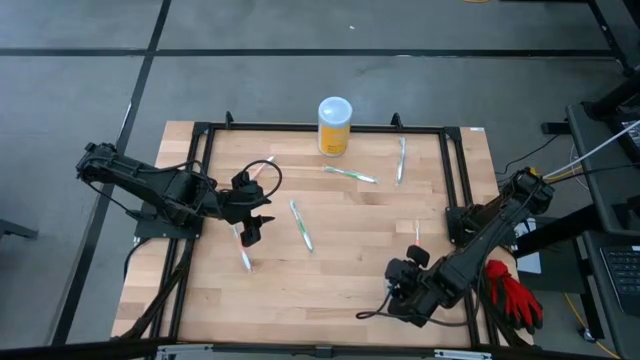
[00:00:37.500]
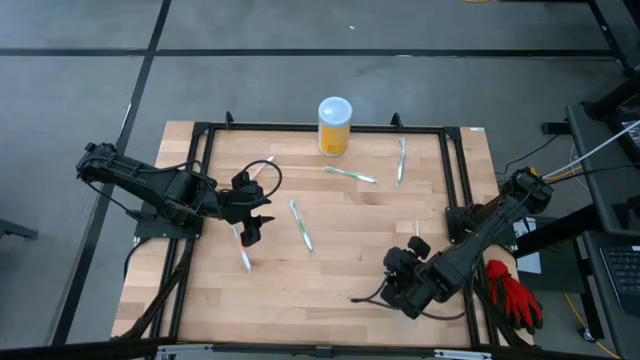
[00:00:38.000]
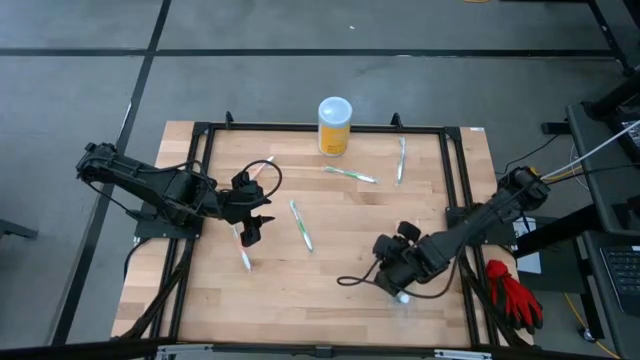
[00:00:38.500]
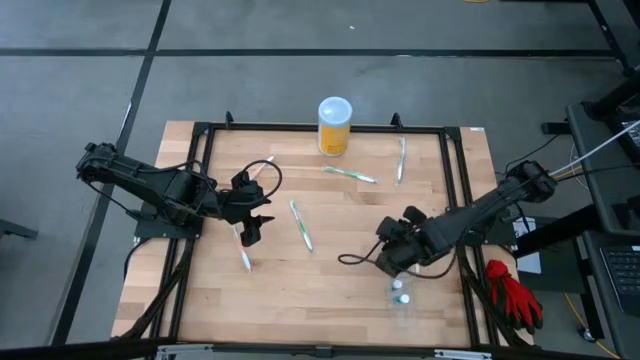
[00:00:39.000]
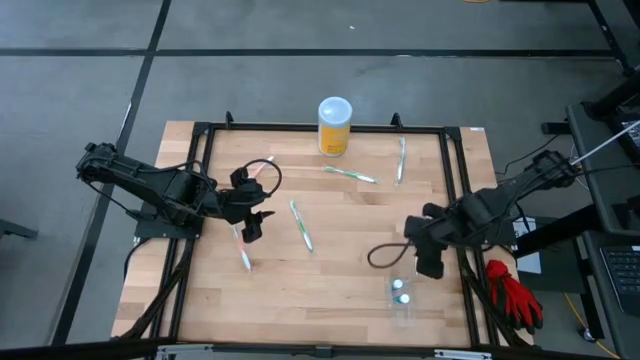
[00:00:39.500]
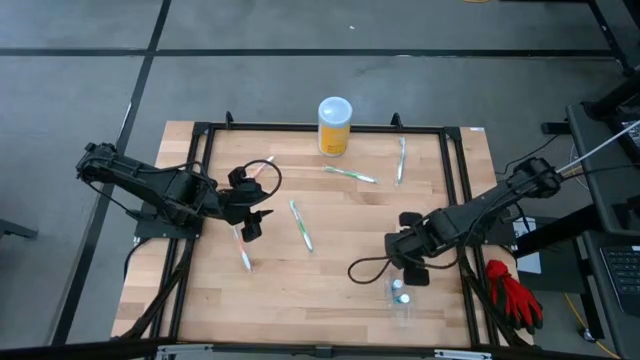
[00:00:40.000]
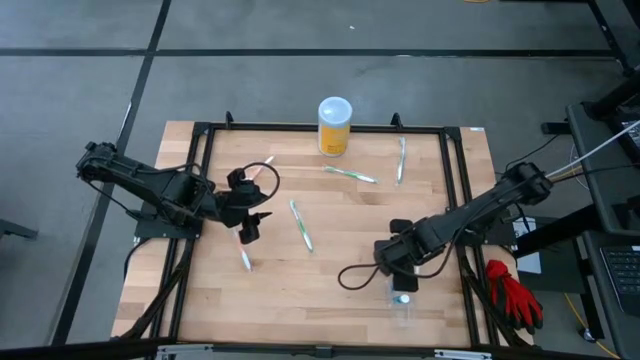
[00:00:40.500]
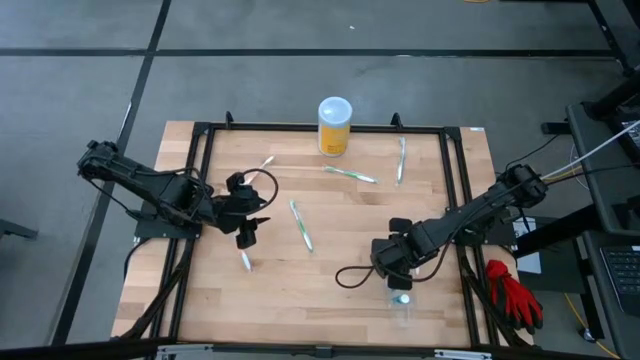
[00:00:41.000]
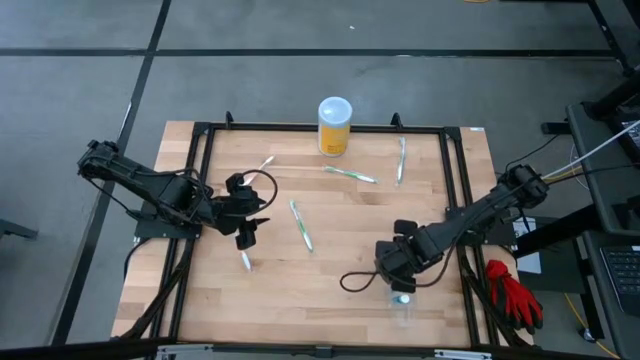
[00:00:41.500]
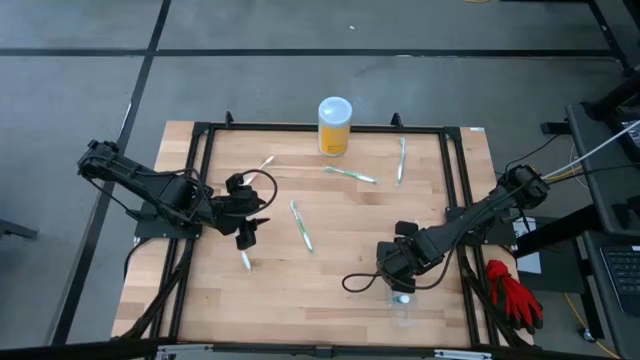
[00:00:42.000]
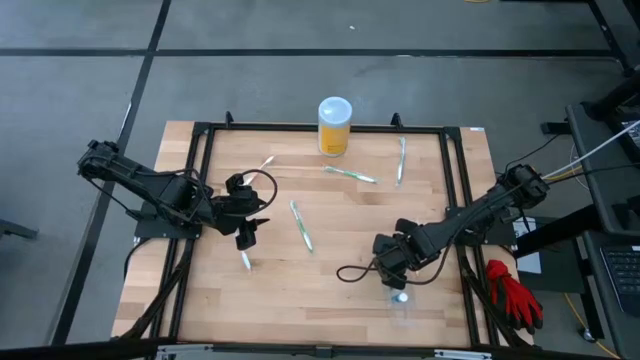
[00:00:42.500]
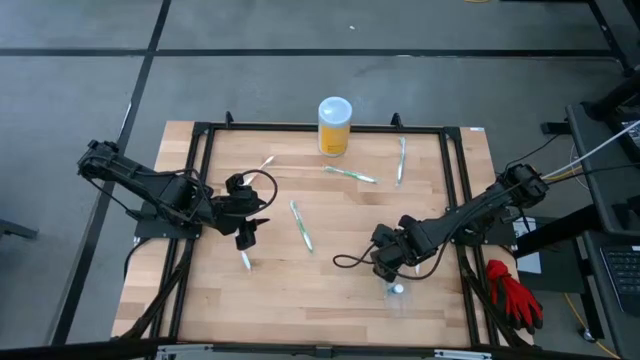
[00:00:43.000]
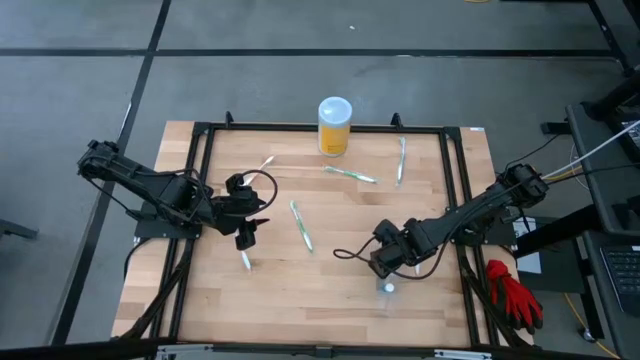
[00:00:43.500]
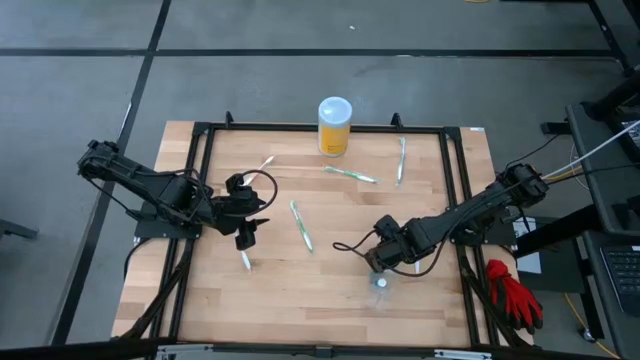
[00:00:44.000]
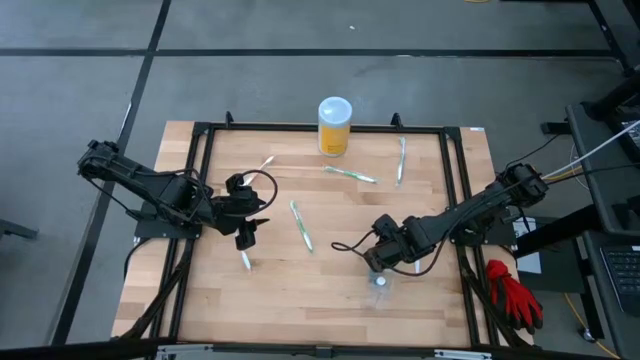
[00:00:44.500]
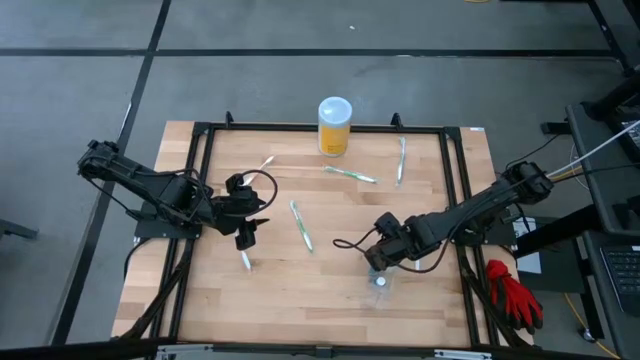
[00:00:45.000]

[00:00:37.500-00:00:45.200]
Task: Pick & Place toothbrushing station
Adjust the transparent organizer on the table

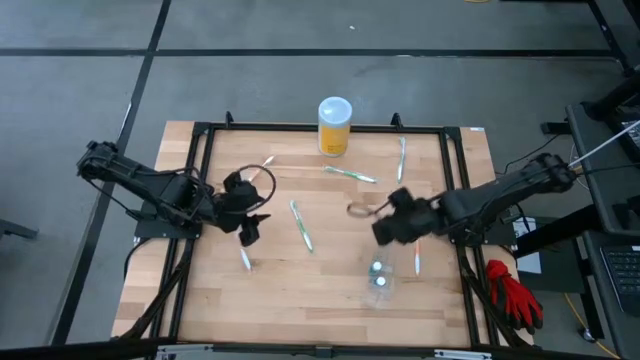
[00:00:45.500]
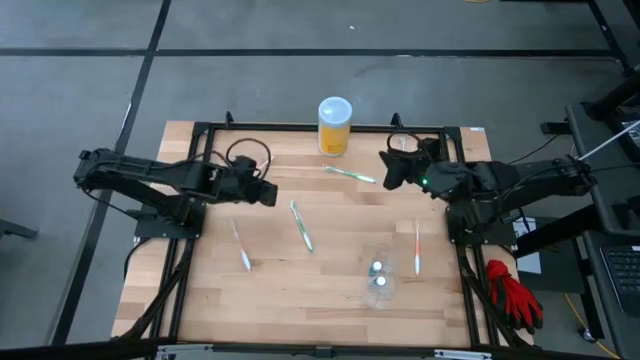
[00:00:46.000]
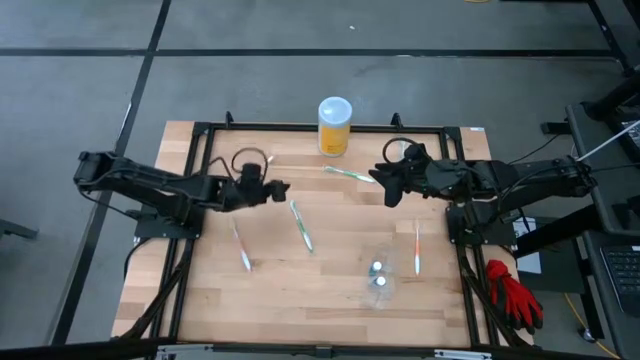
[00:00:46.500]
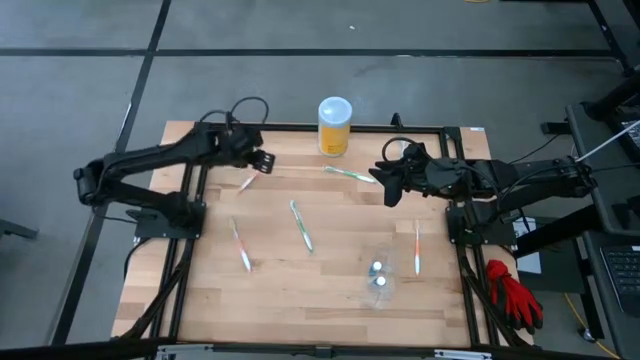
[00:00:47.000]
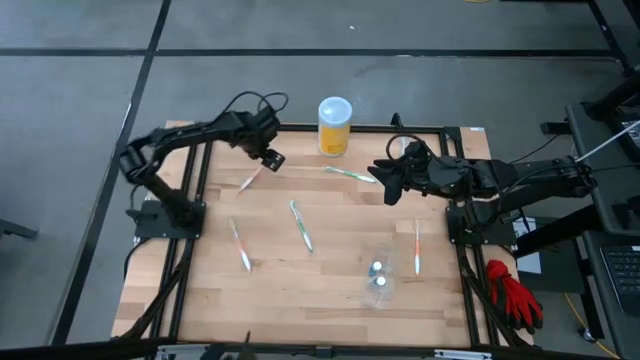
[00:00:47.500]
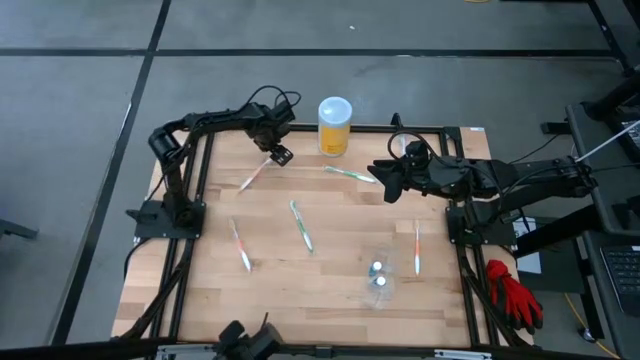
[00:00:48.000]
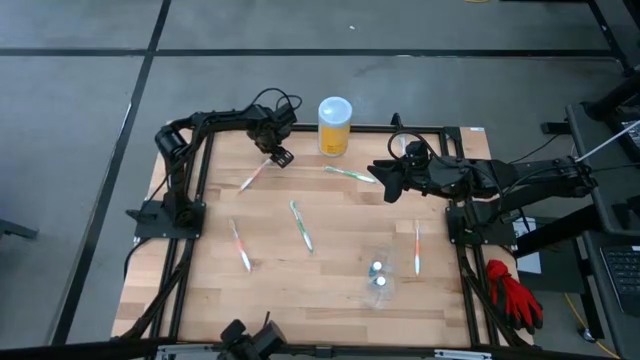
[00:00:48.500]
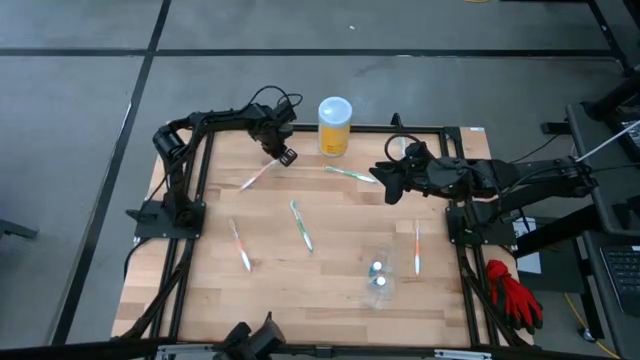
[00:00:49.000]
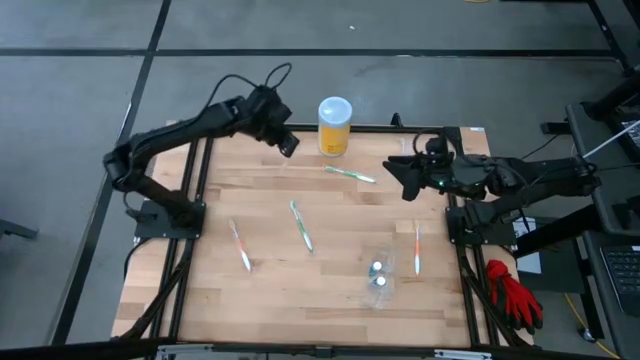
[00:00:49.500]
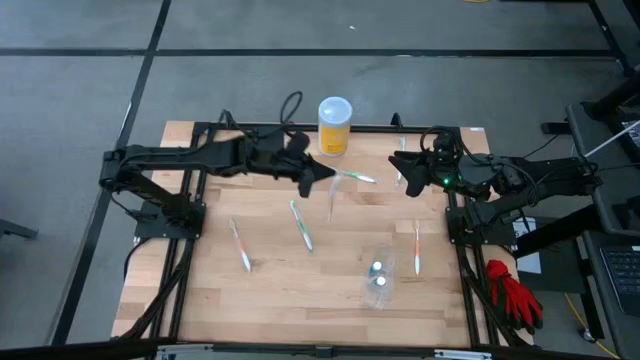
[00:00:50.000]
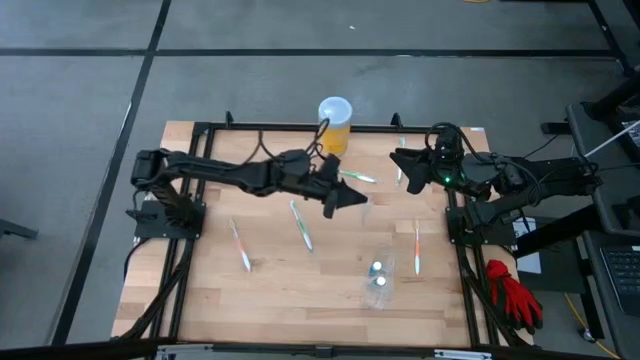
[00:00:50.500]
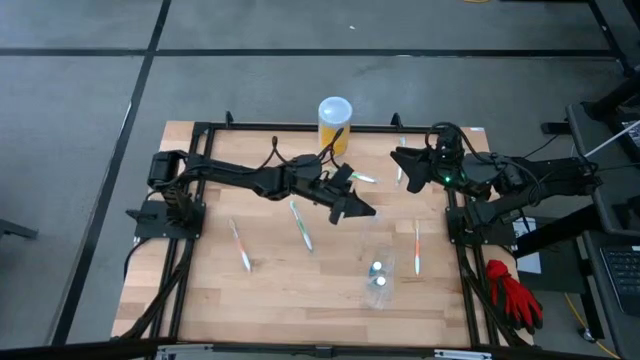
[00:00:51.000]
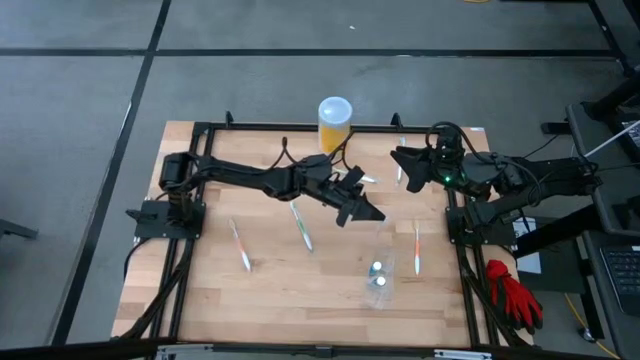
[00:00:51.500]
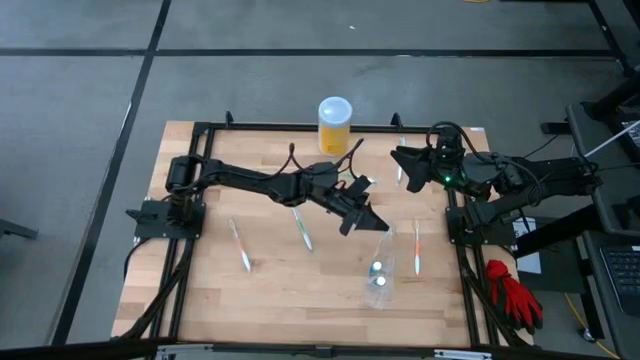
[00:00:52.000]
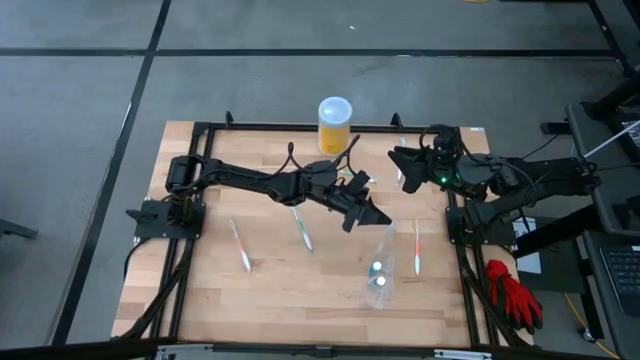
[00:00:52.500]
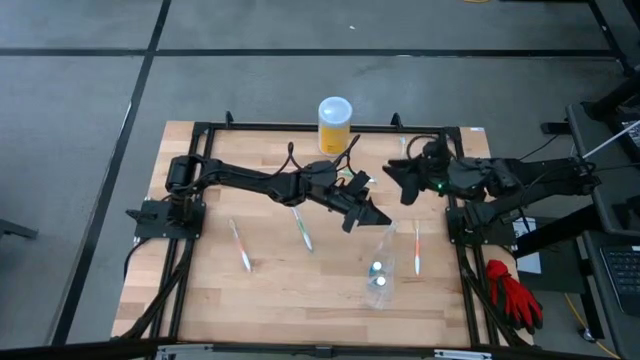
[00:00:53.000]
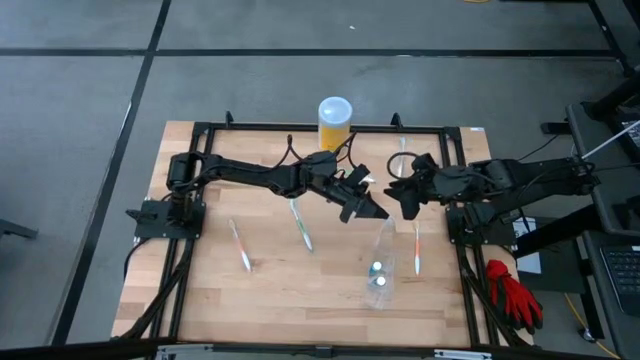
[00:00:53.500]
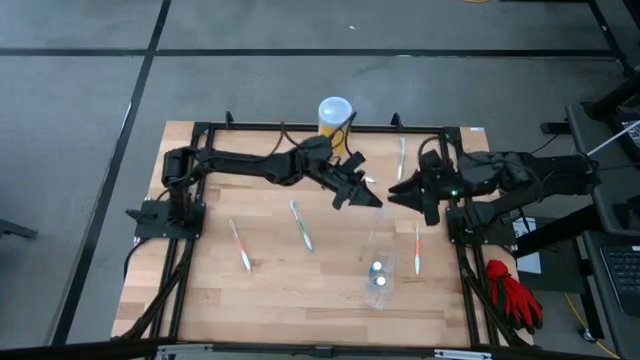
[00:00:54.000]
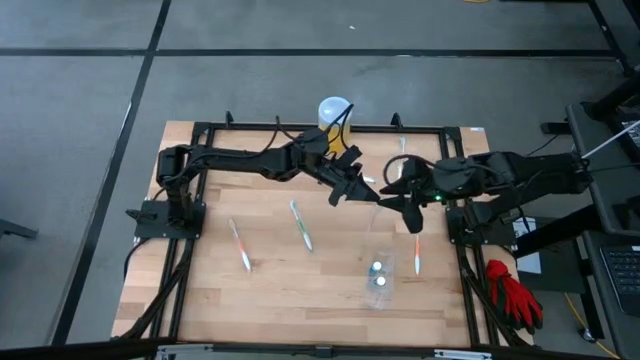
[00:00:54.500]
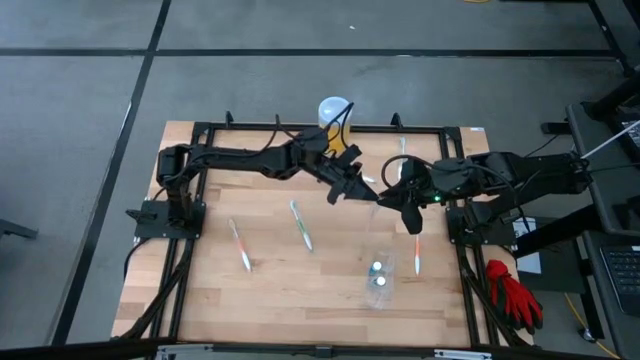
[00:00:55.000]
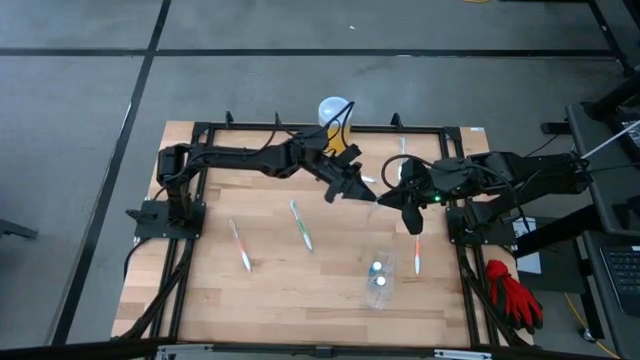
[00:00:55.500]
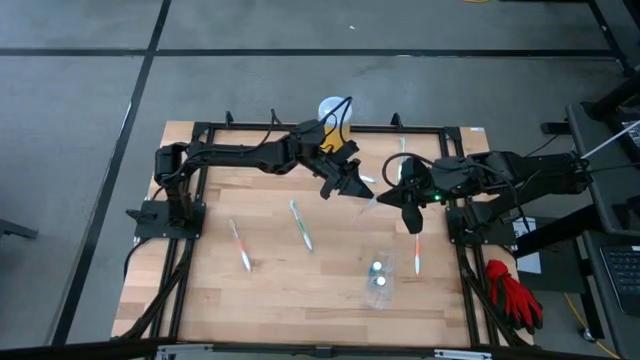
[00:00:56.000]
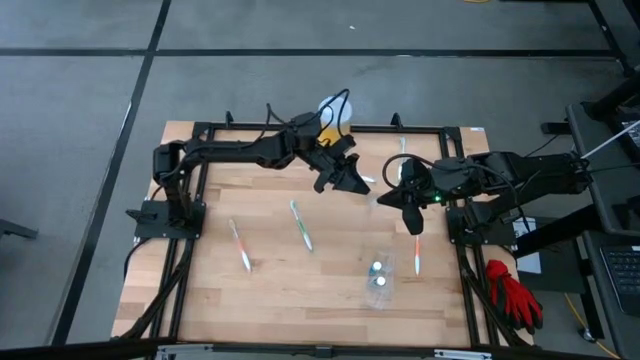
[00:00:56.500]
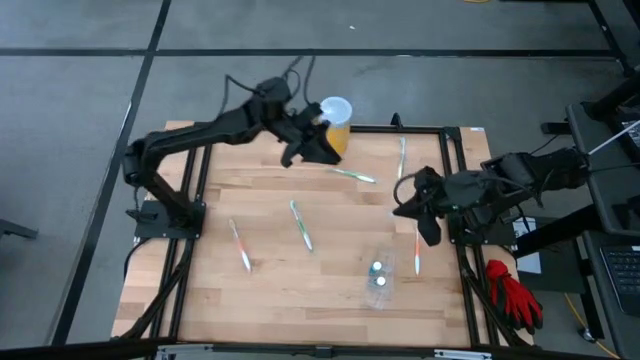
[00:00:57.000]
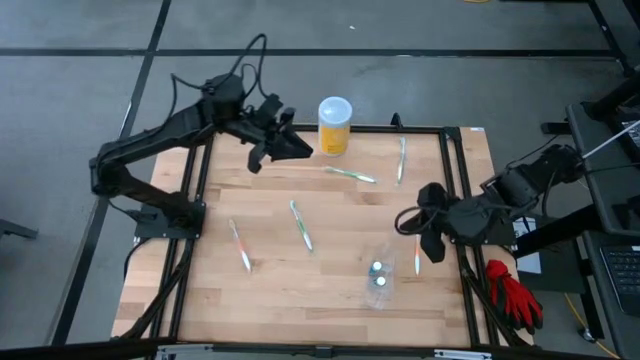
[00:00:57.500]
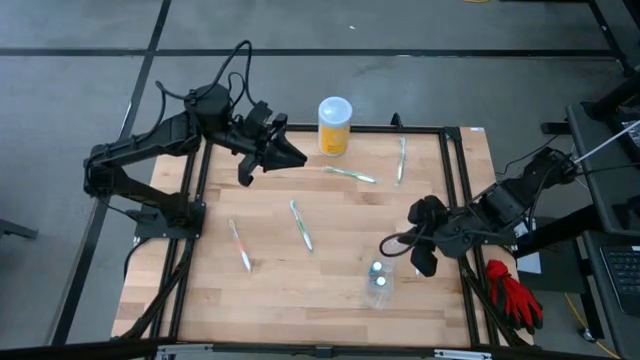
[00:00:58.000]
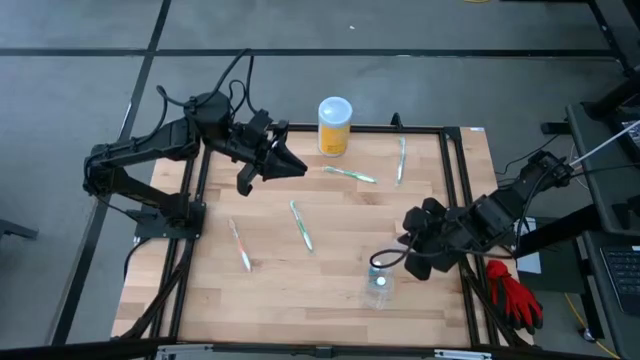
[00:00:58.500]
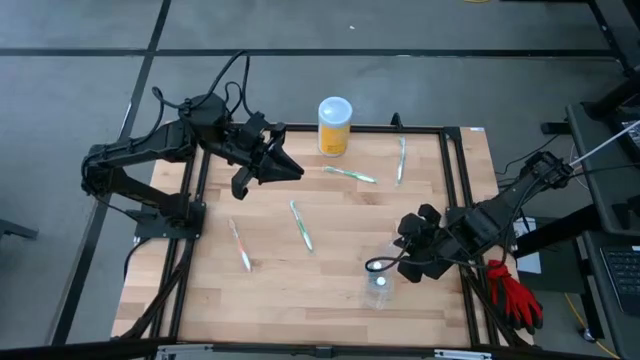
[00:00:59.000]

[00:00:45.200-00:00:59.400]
Put the top orange toothbrush into the transparent organizer
